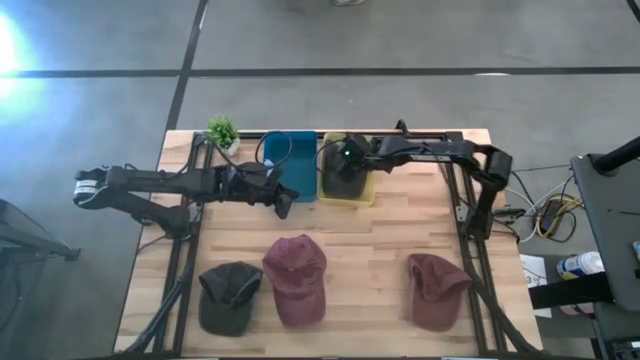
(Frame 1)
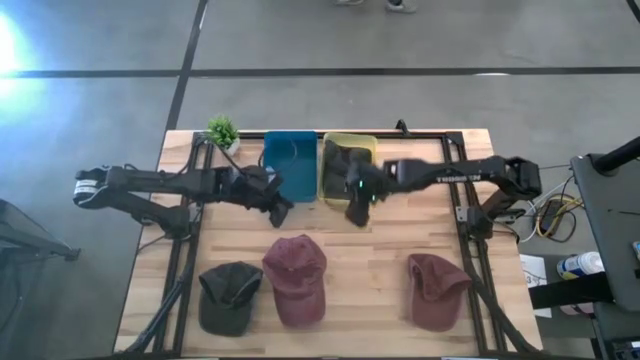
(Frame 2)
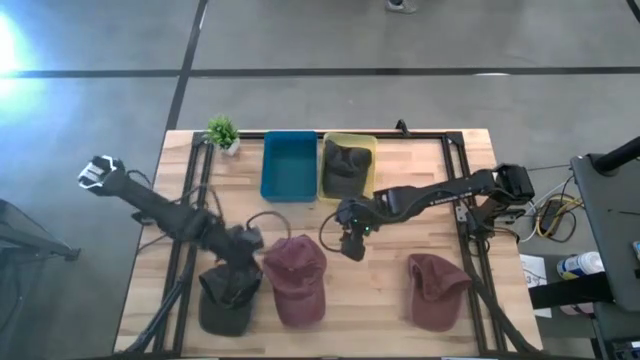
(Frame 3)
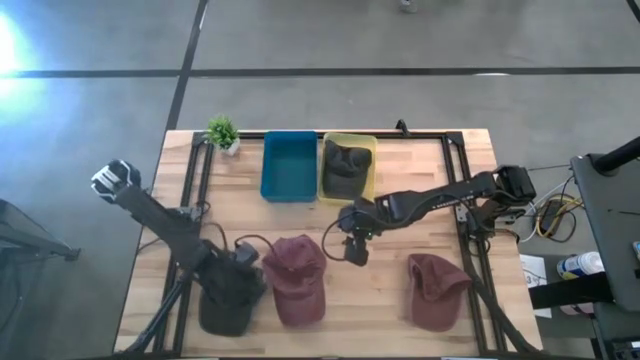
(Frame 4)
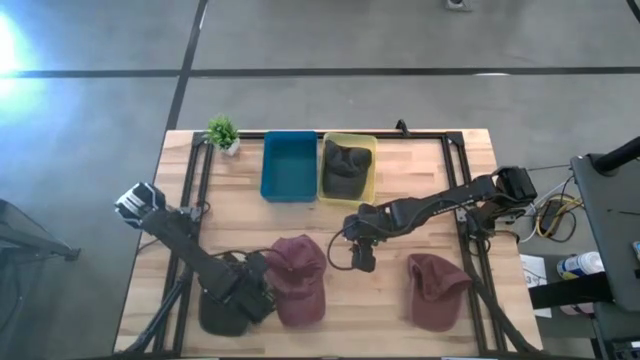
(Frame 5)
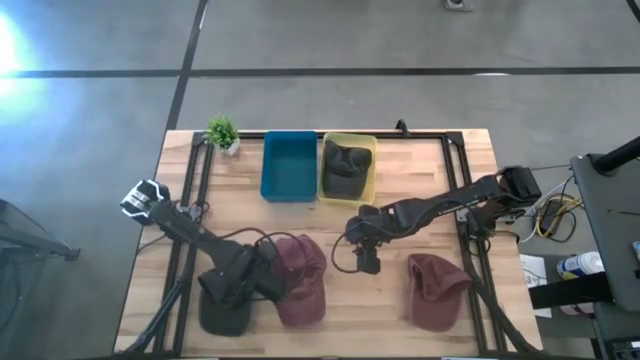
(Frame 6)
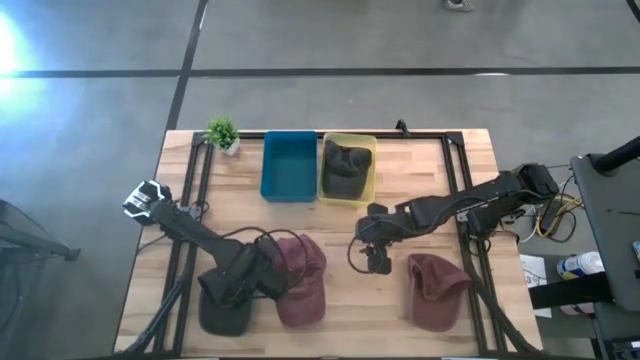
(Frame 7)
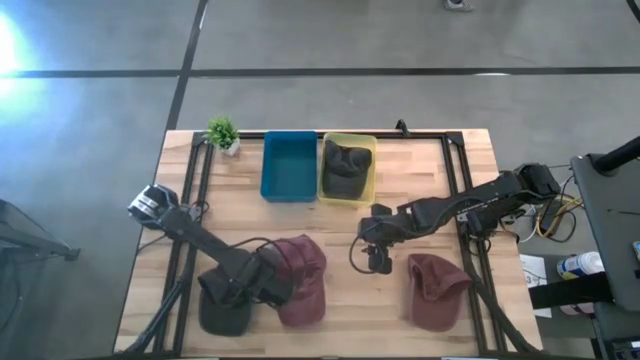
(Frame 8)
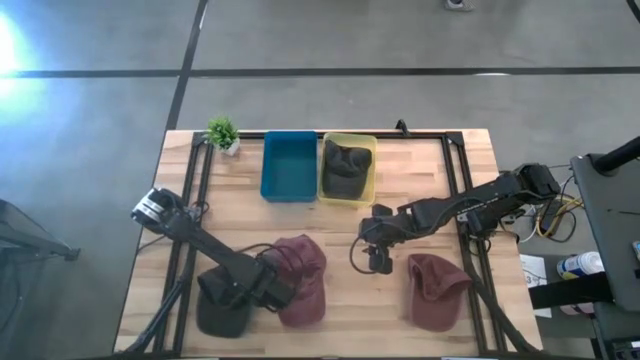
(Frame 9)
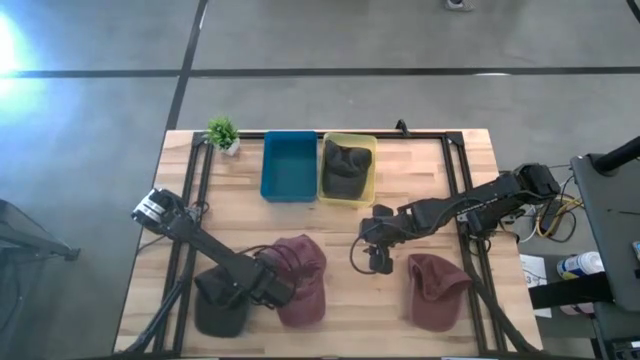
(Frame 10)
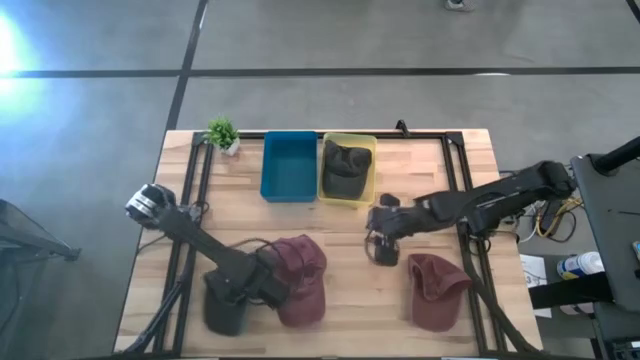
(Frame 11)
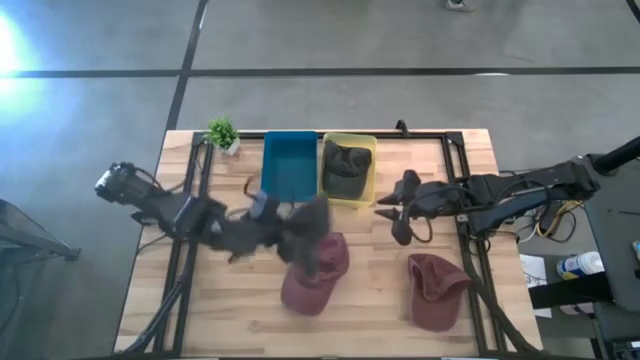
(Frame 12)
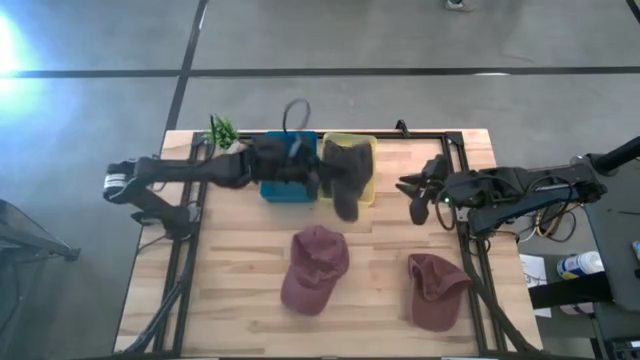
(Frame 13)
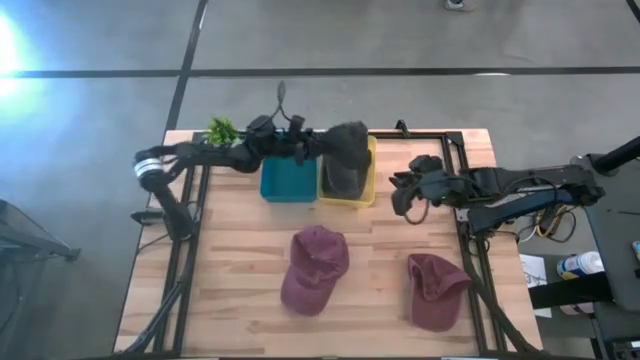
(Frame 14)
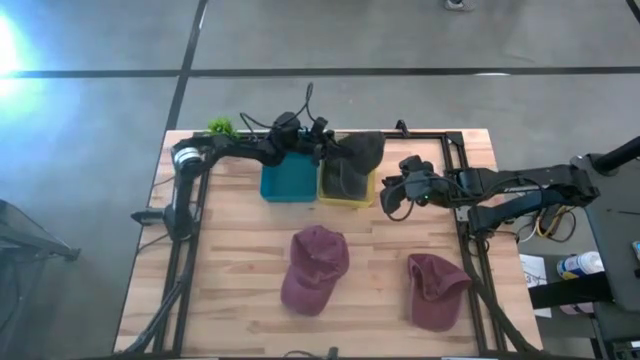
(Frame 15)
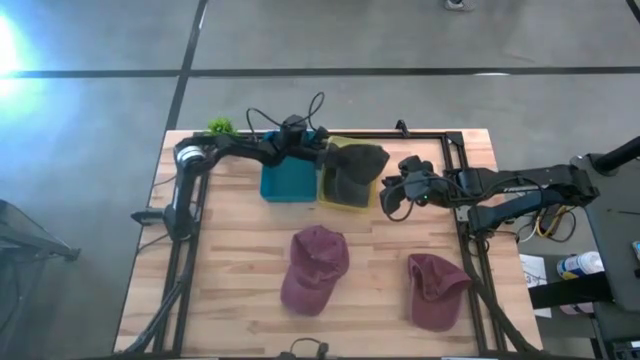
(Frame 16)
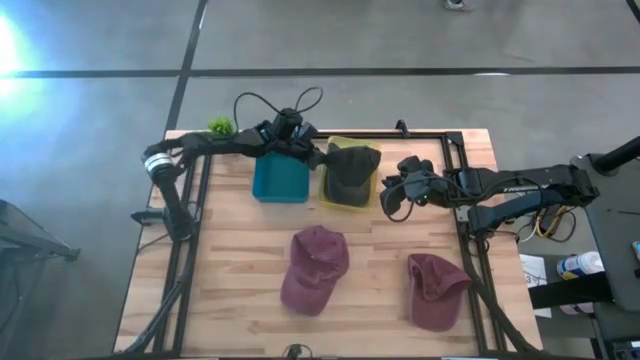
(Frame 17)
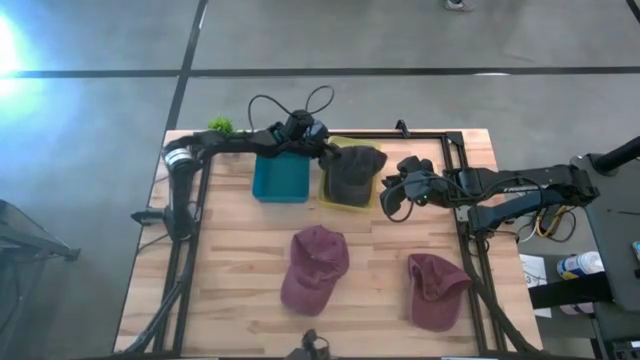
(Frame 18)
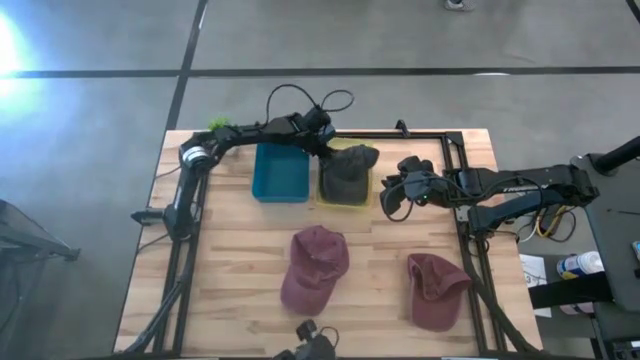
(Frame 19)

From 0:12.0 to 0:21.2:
Task: Pick & Place hat
Put the black cap into the yellow bin

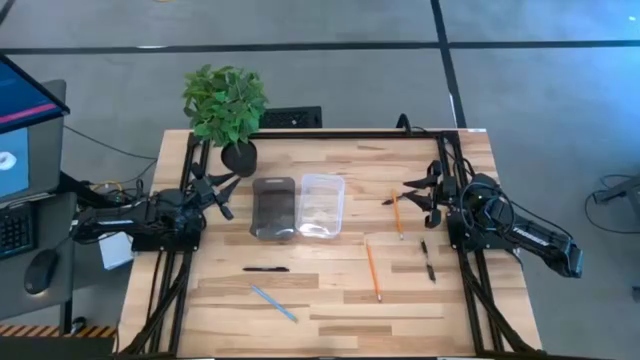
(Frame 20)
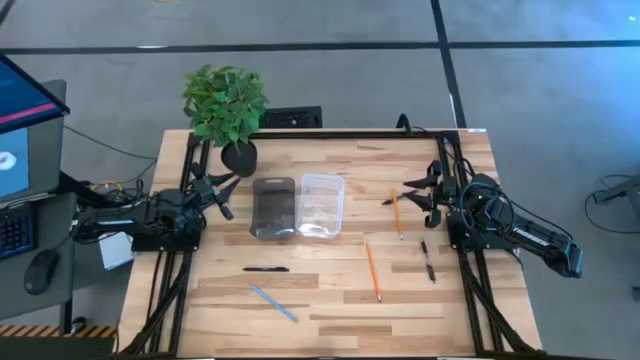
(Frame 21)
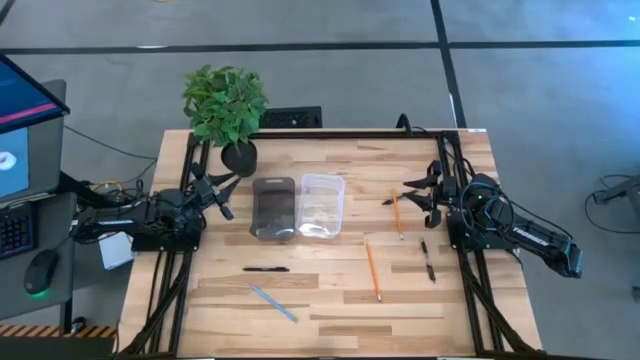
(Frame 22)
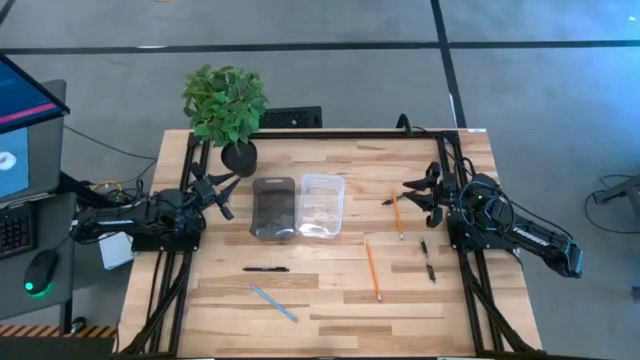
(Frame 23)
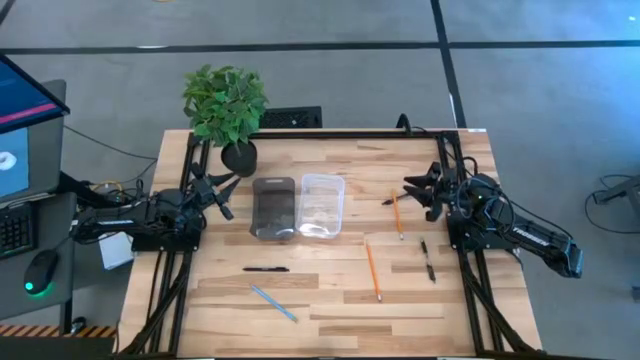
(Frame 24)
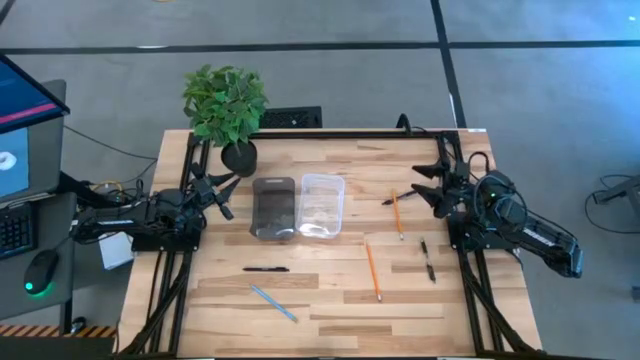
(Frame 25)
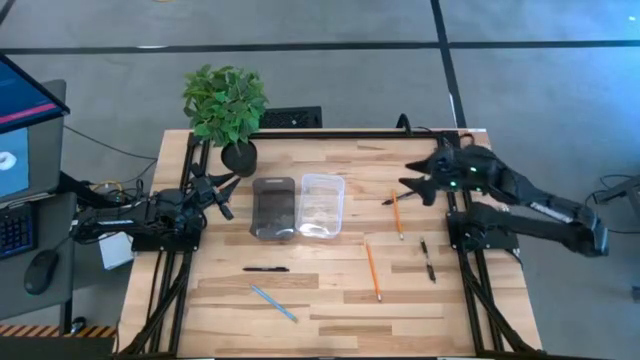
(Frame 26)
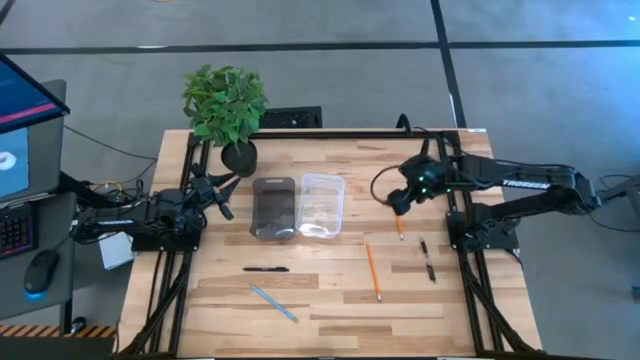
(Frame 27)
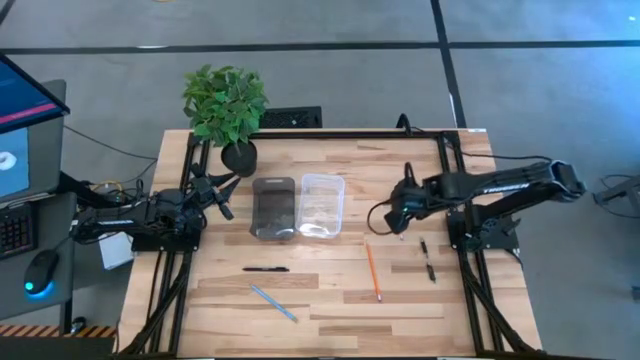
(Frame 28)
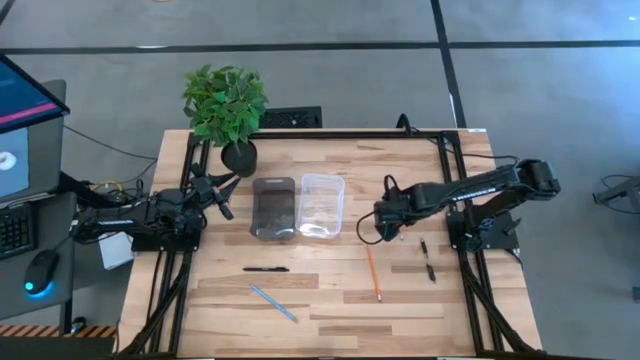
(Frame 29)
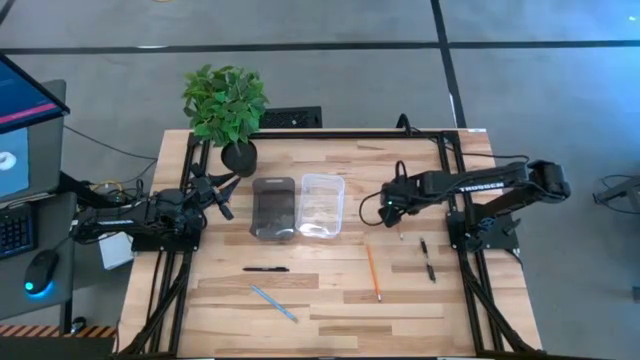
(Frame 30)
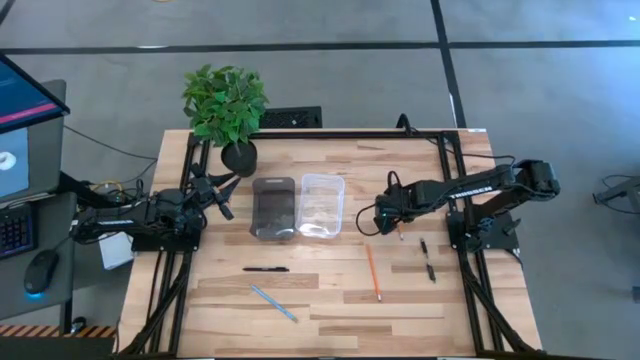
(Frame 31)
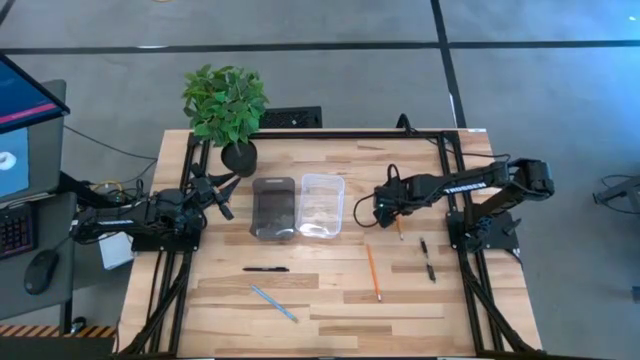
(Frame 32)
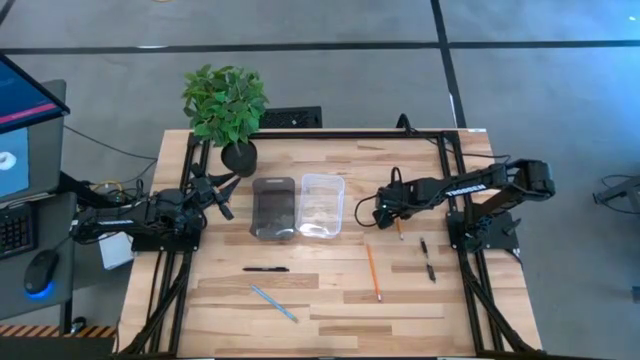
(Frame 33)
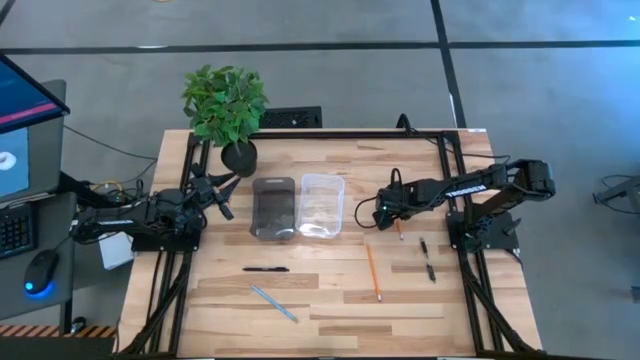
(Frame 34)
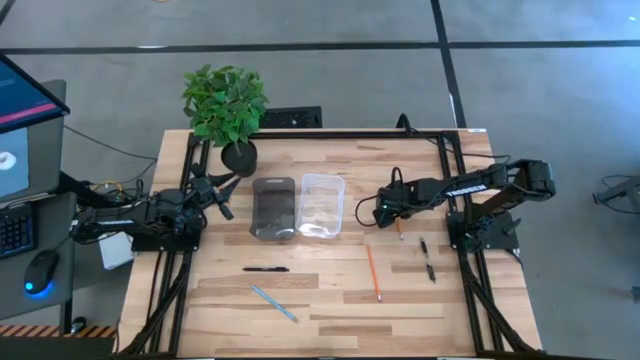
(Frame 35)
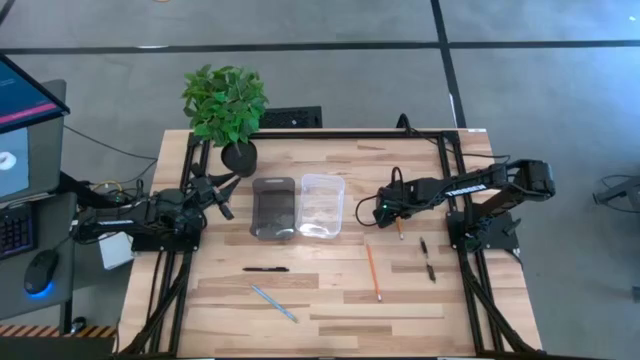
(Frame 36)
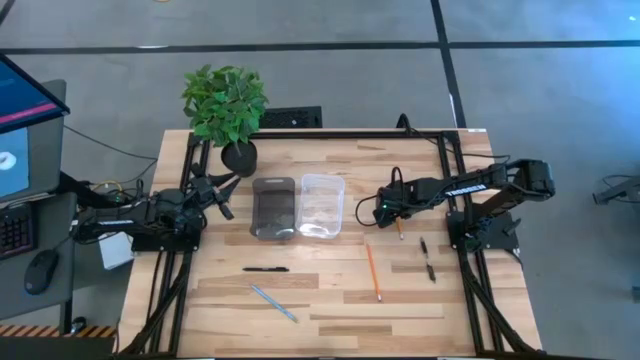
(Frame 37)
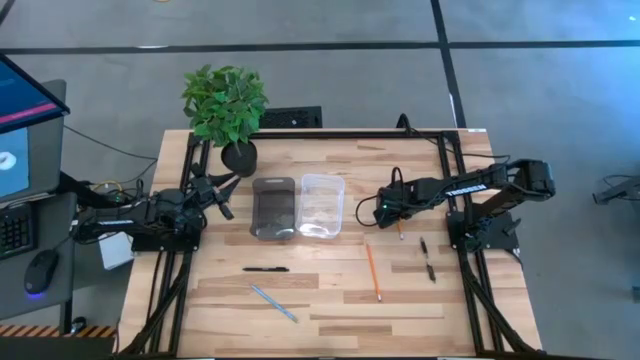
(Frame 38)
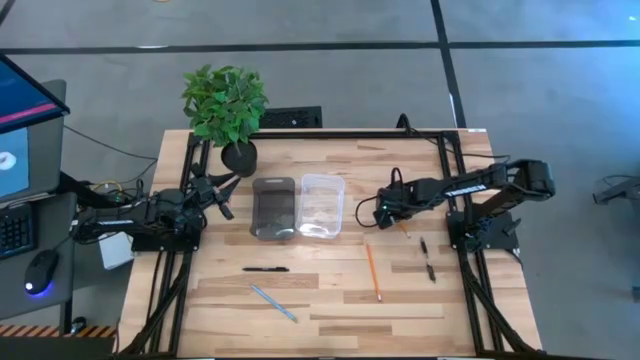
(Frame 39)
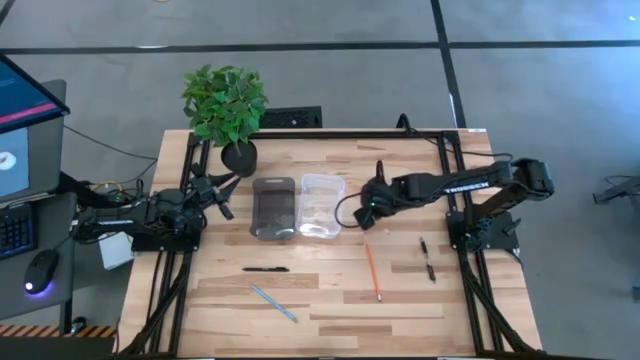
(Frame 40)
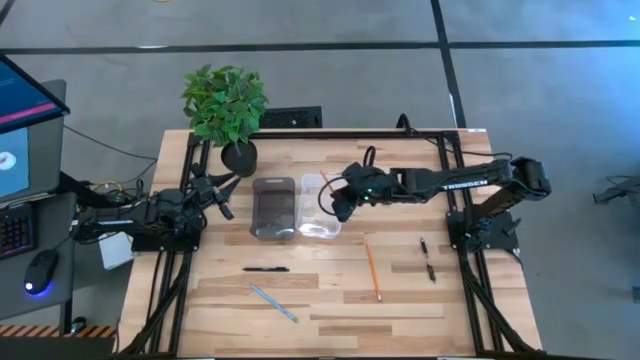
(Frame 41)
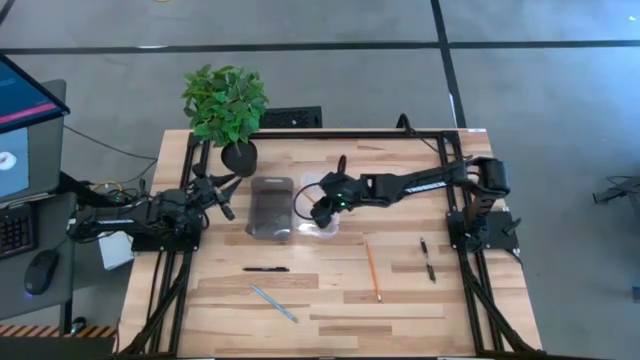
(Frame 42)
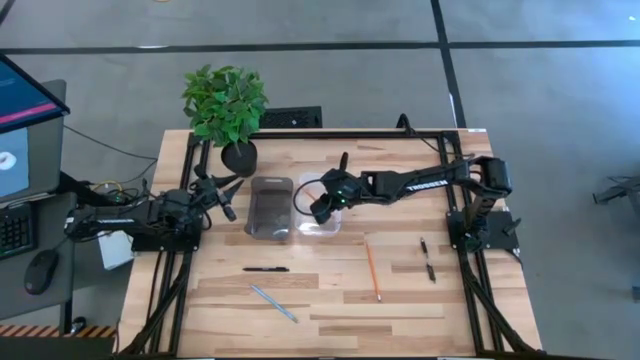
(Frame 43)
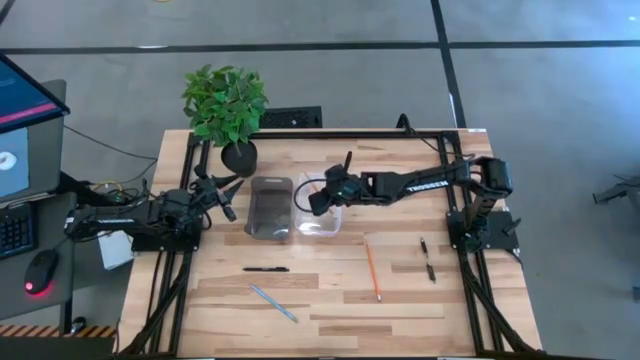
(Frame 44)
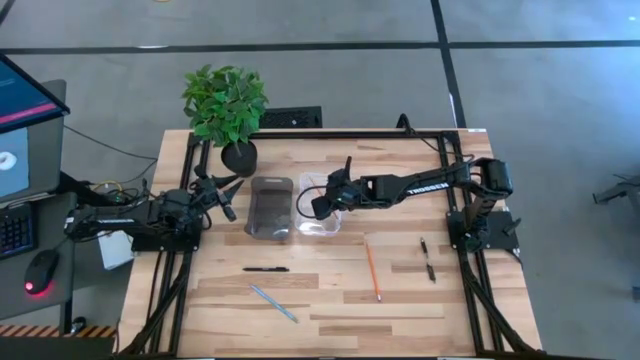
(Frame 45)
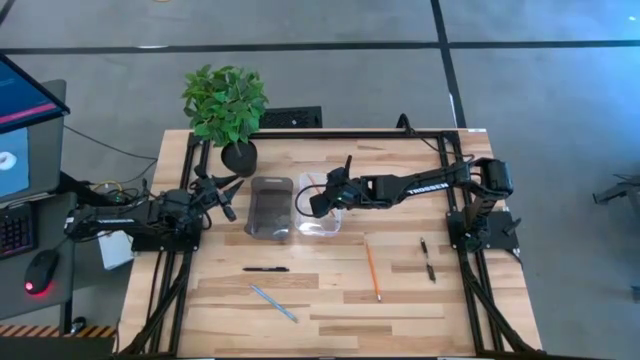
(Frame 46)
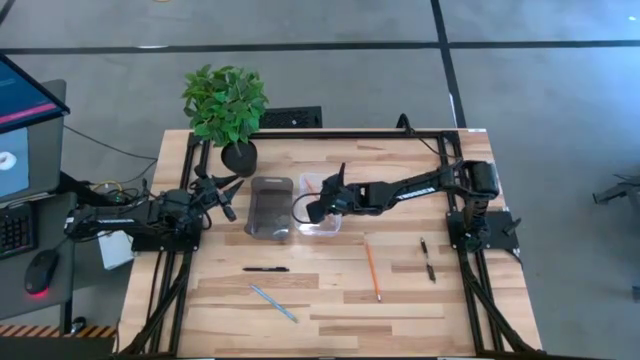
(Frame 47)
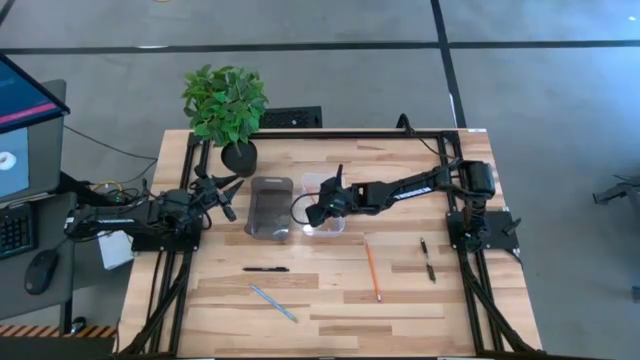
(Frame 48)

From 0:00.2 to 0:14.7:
Task: Sort pens & pencils
Put the right yellow pencil into the white bin
